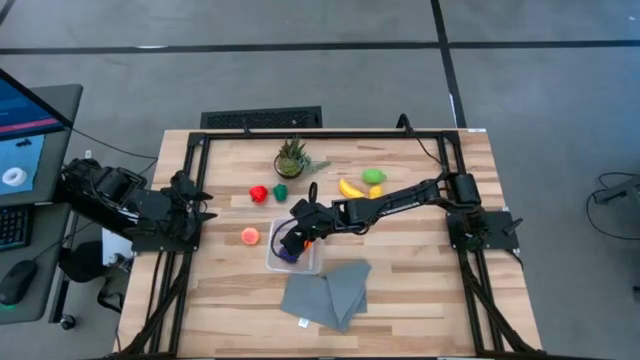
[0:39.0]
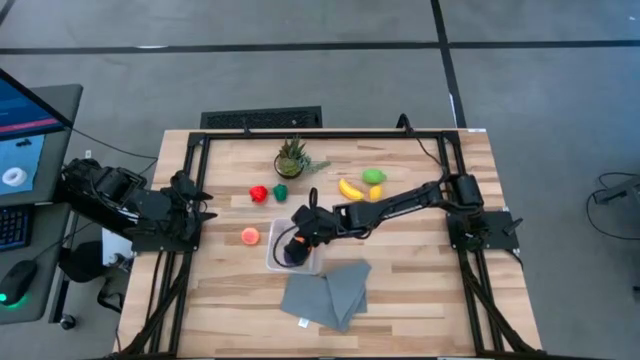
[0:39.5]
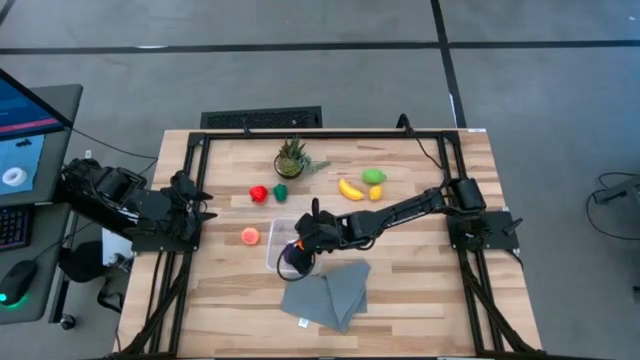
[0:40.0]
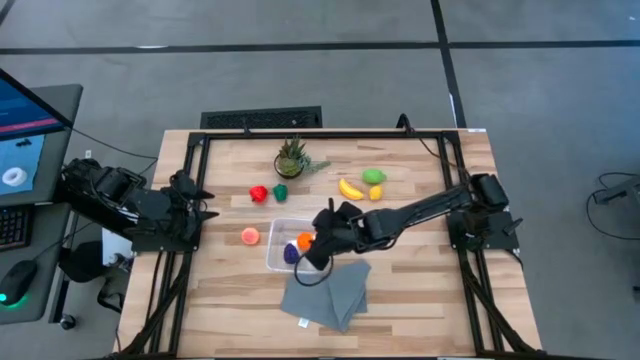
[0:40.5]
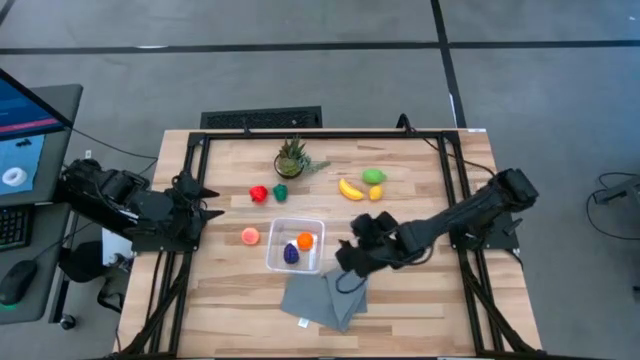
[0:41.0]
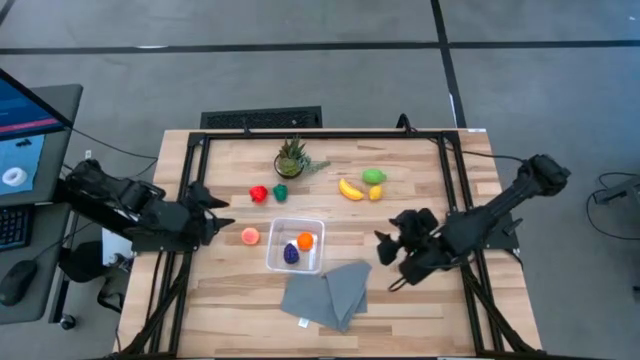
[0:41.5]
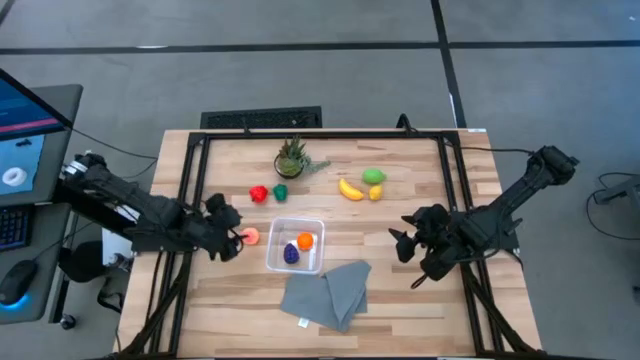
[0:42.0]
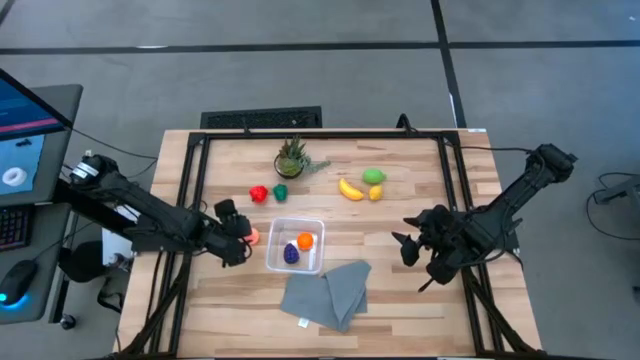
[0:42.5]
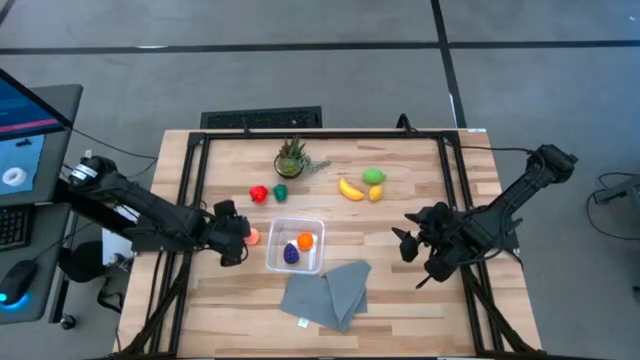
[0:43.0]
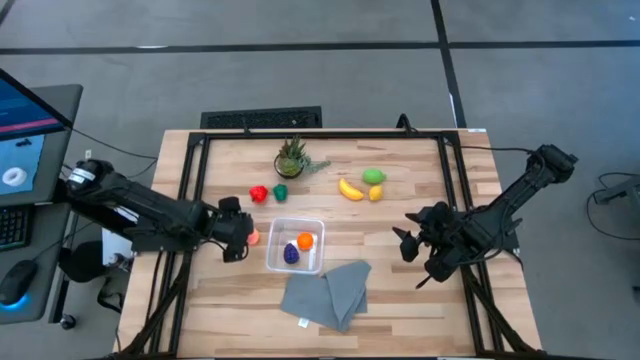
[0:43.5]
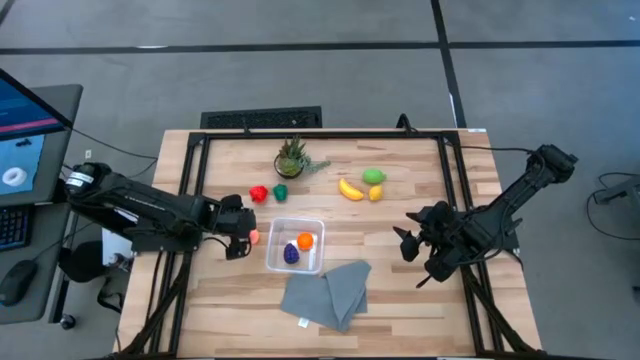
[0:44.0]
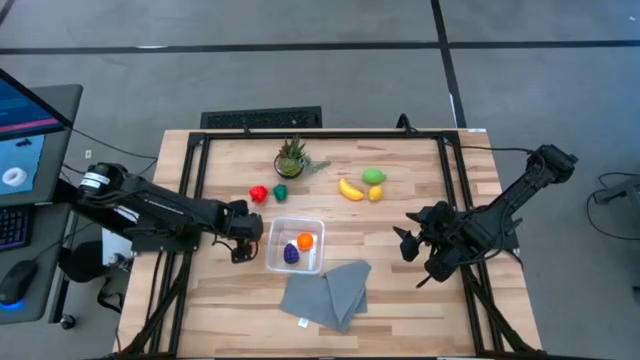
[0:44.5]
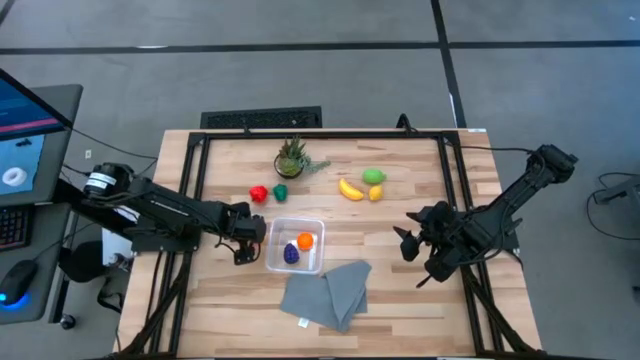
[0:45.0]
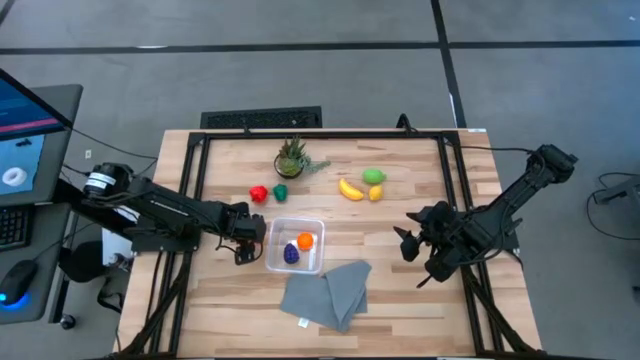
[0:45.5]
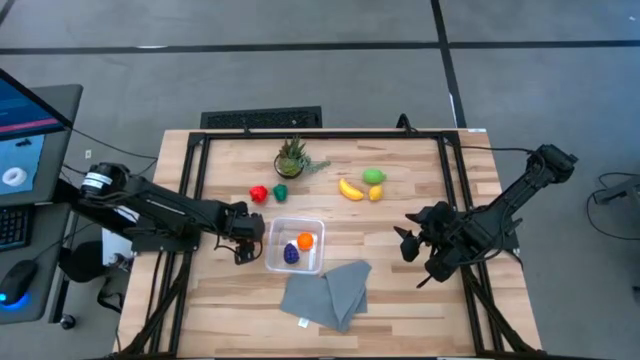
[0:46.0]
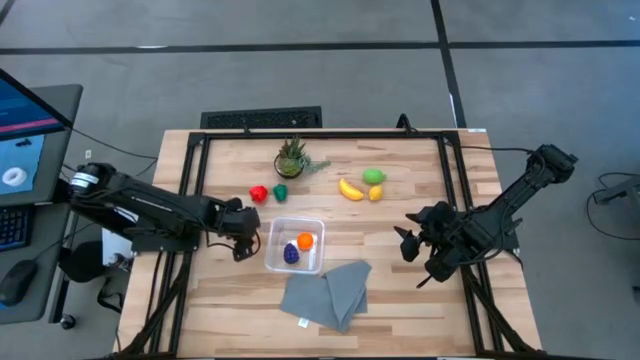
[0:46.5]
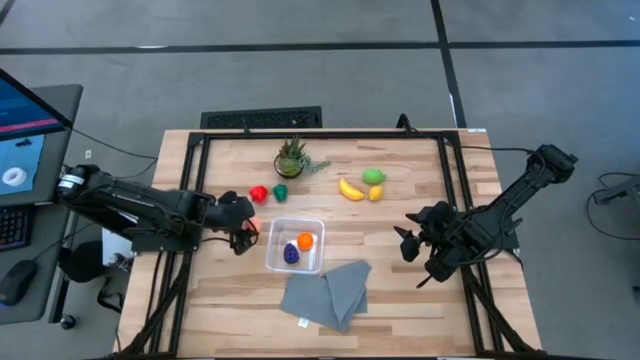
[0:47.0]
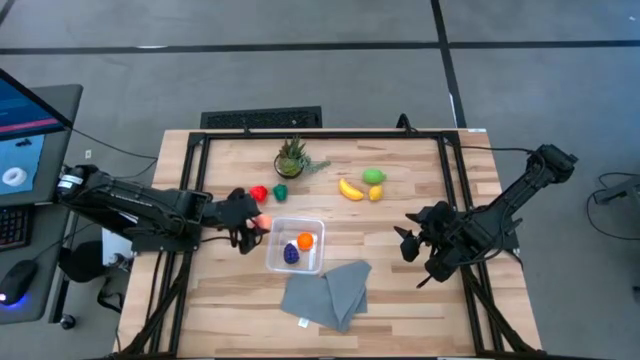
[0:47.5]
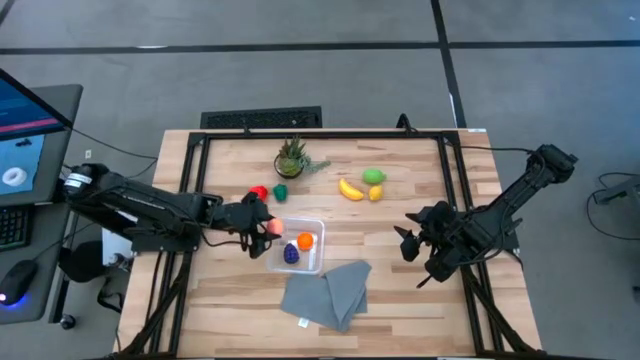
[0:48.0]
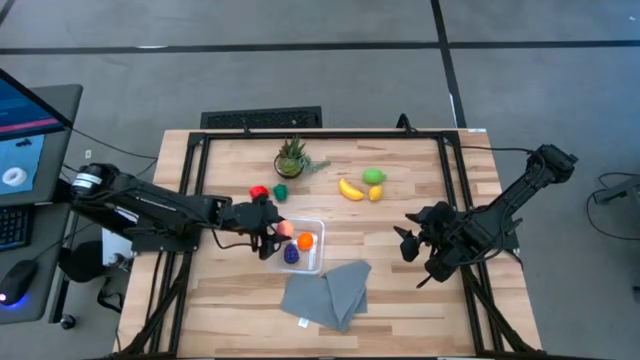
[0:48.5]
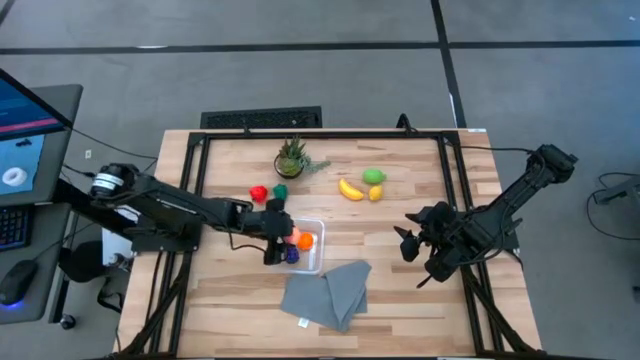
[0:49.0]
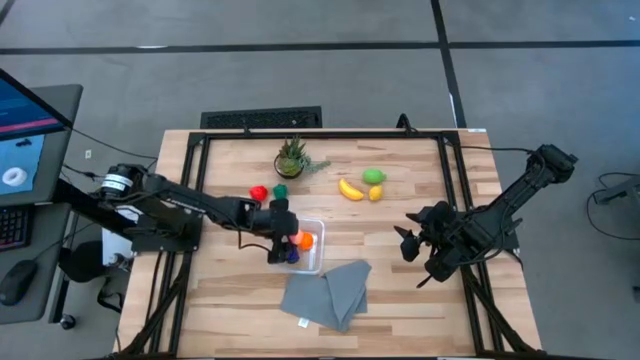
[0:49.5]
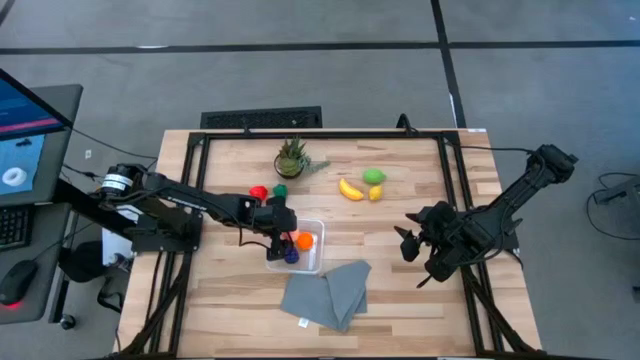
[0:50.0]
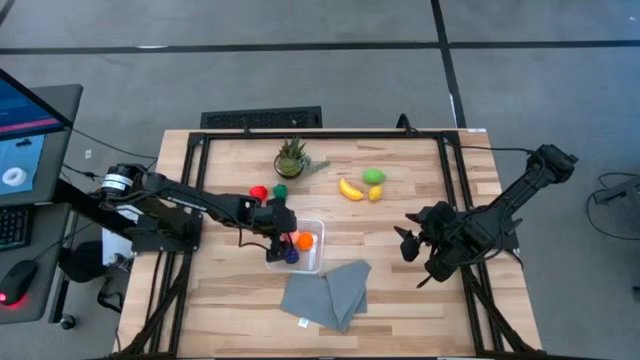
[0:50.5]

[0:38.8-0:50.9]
Task: Pick and placing Produce into tupperware
Put the pink peach into the transparent container

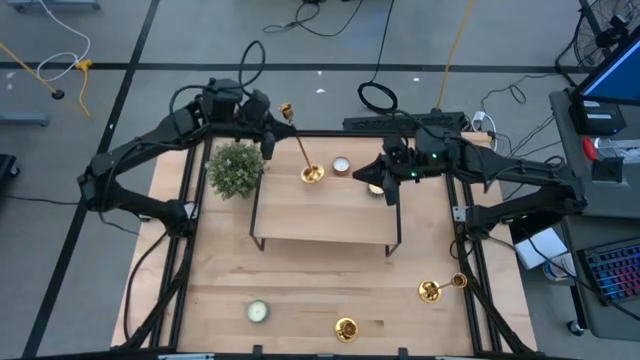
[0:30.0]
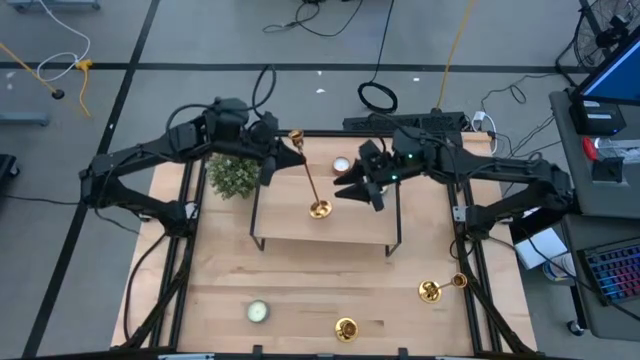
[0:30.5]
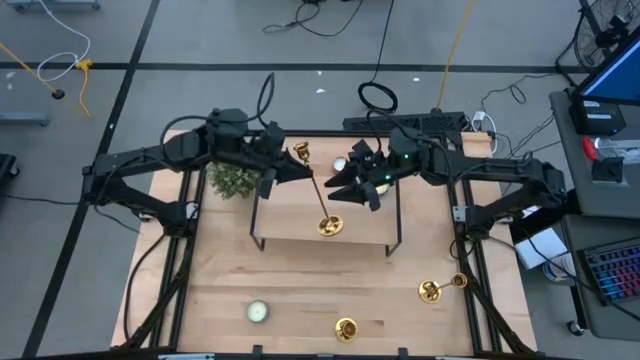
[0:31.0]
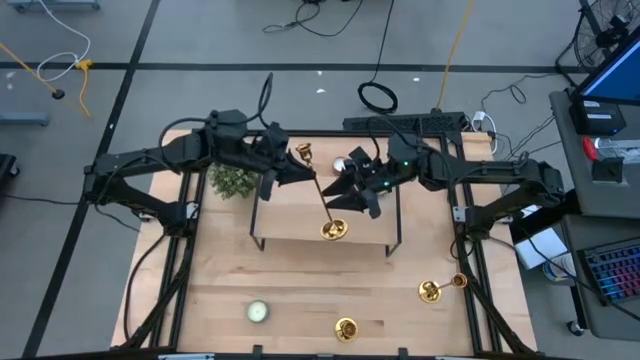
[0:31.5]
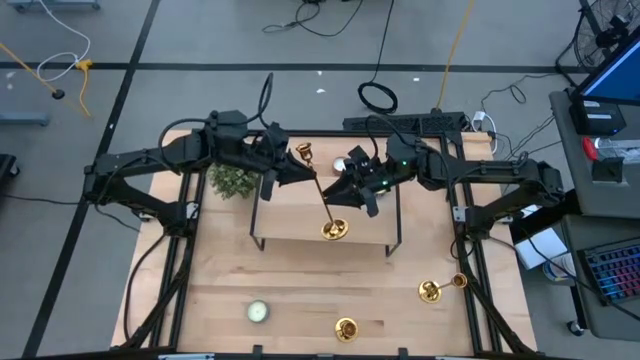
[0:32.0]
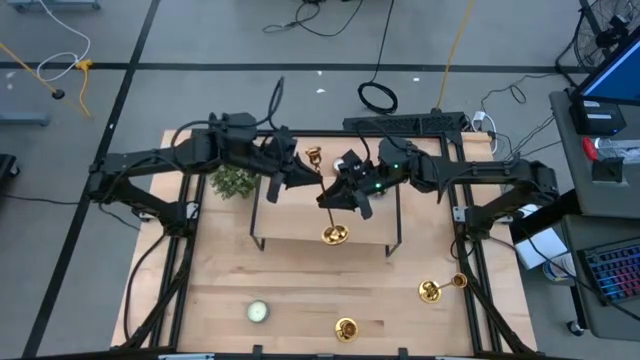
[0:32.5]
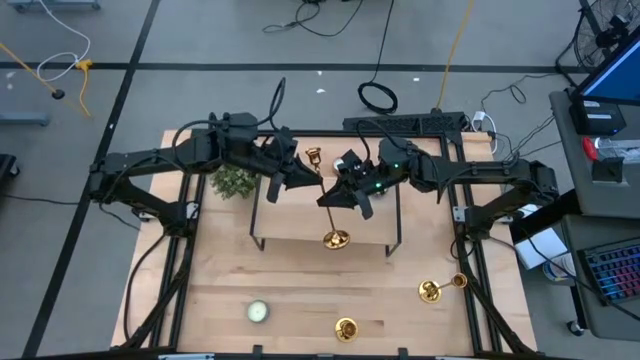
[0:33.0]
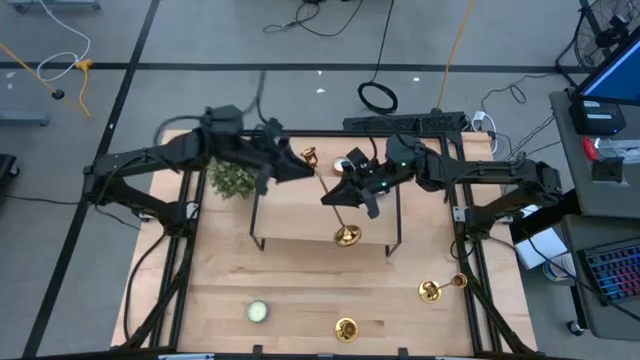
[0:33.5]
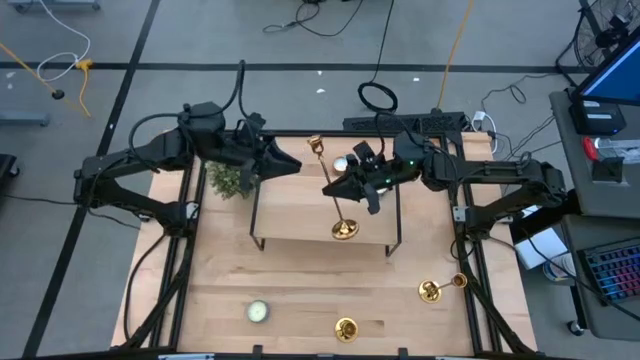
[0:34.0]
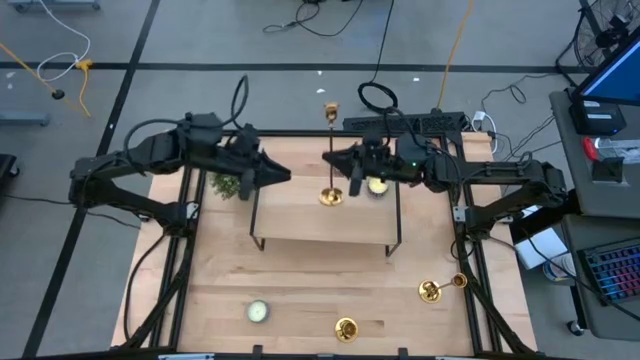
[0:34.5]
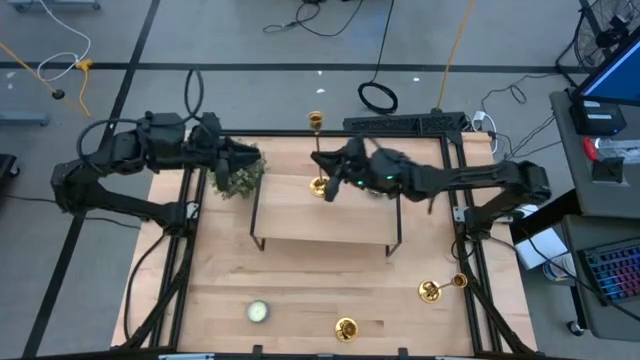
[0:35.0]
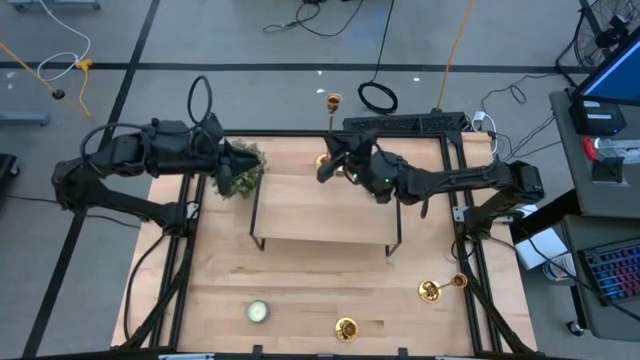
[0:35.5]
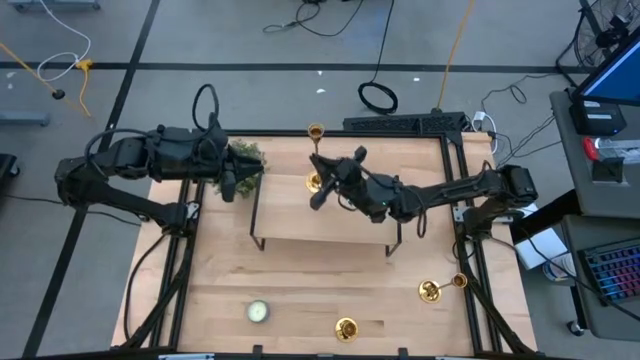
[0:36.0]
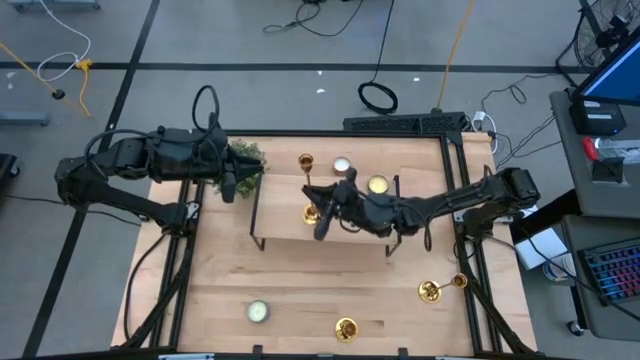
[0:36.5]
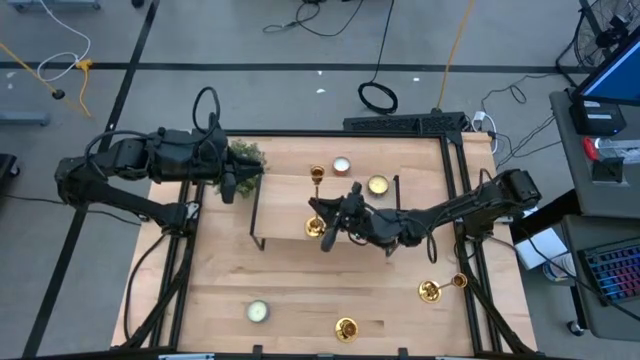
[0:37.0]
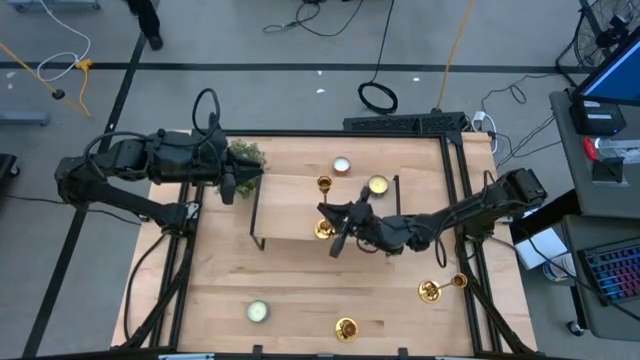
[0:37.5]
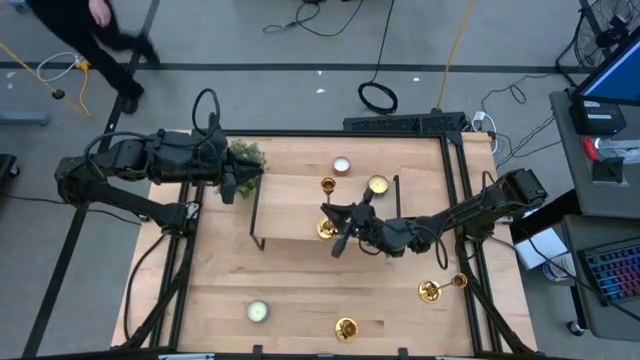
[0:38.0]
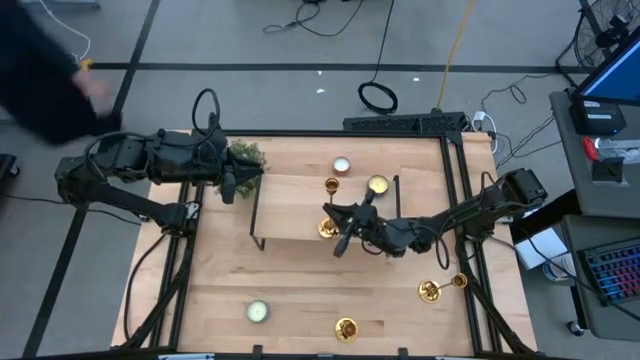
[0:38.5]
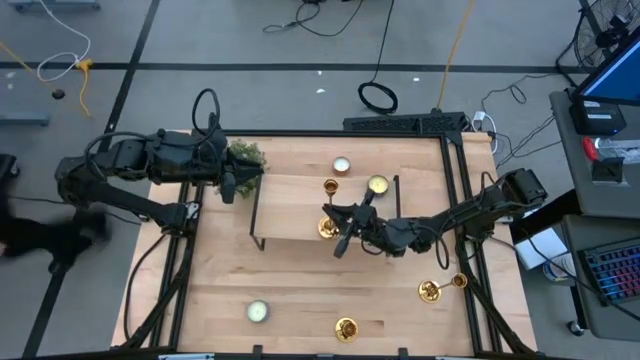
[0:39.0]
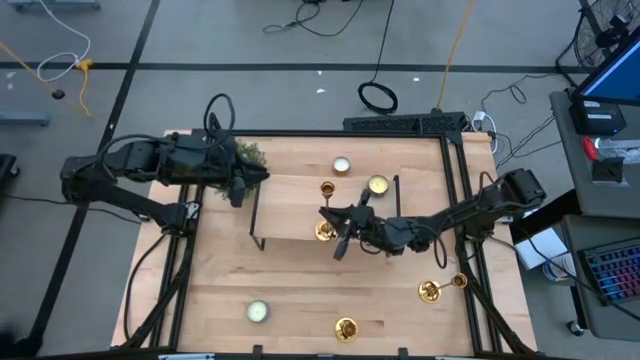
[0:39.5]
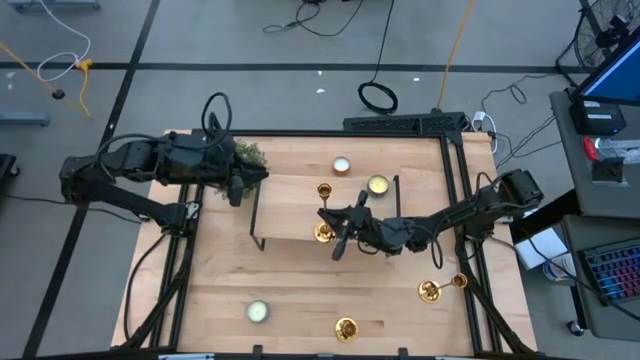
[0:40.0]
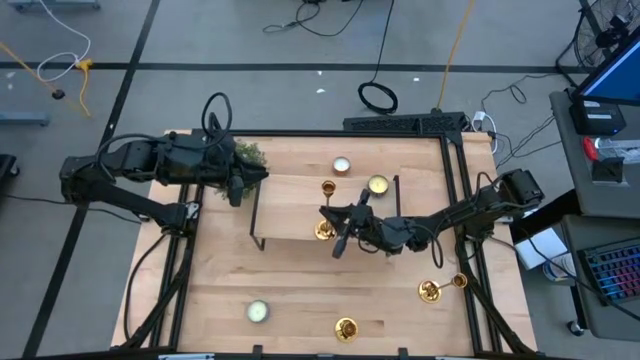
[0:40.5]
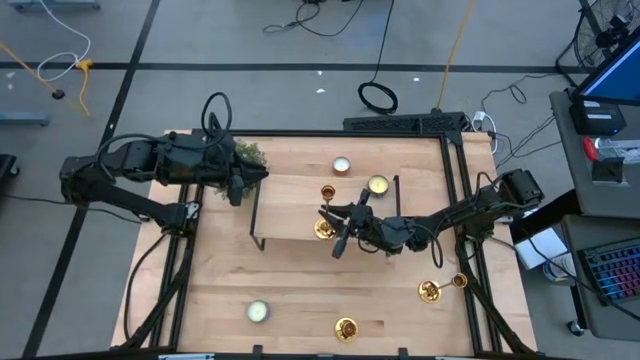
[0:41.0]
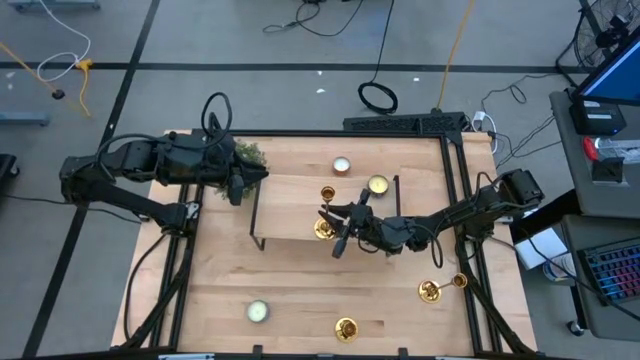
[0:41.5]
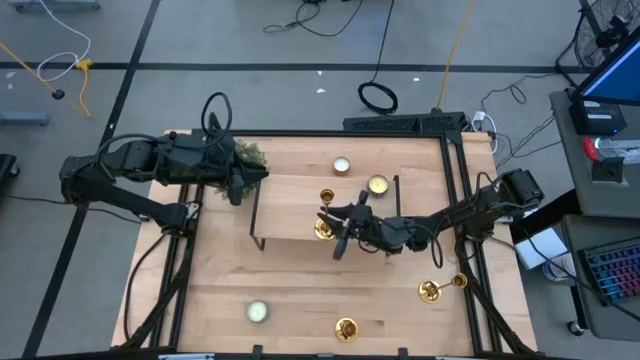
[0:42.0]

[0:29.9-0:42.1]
Task: Pick & Place candle stick holders
Put the top gold candle holder on the shelf
